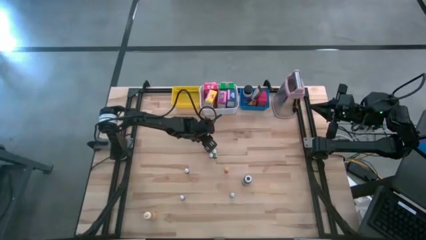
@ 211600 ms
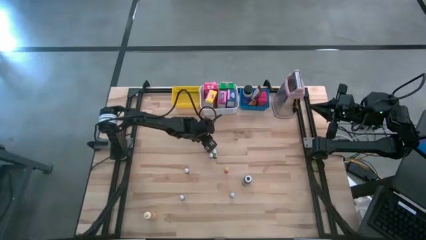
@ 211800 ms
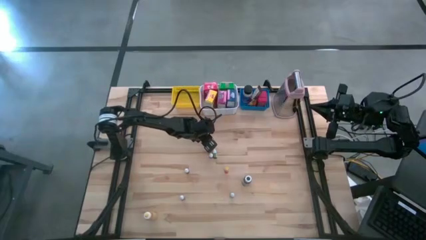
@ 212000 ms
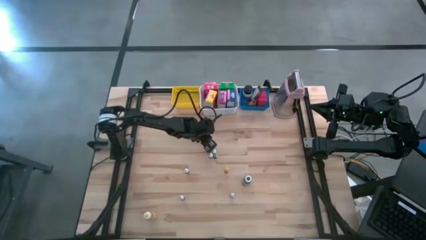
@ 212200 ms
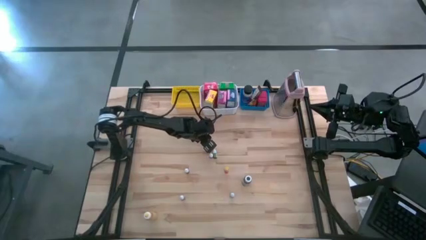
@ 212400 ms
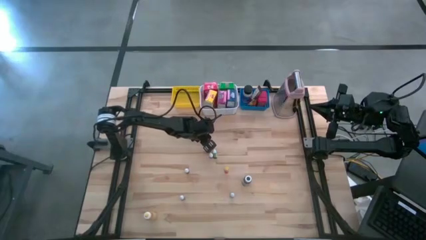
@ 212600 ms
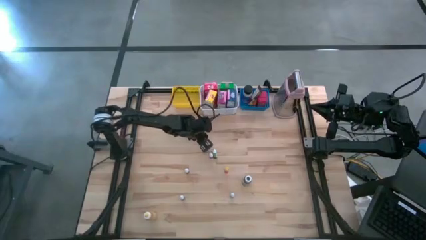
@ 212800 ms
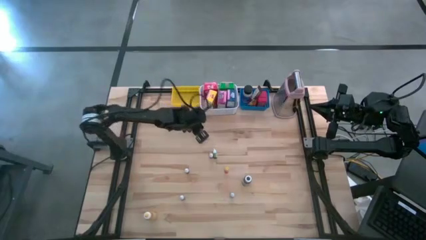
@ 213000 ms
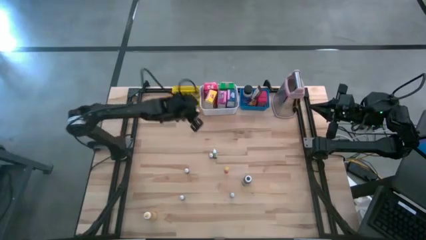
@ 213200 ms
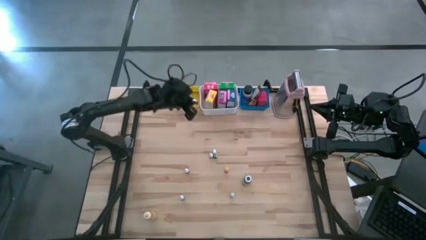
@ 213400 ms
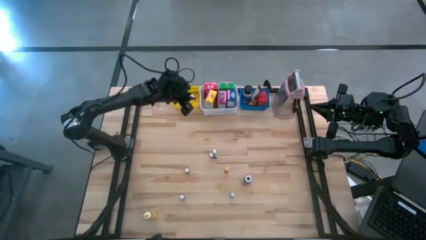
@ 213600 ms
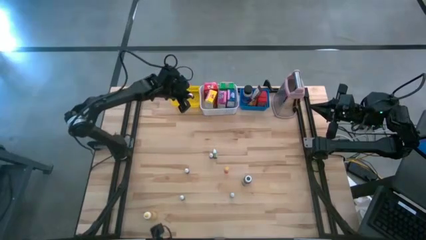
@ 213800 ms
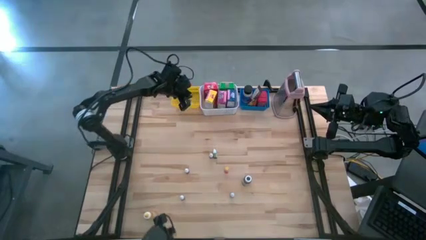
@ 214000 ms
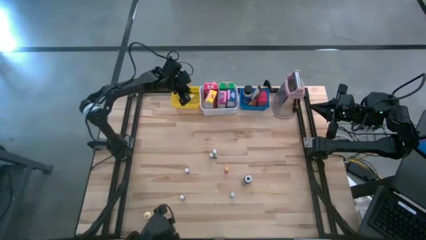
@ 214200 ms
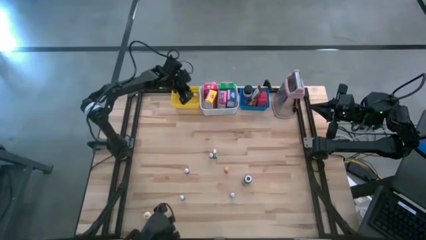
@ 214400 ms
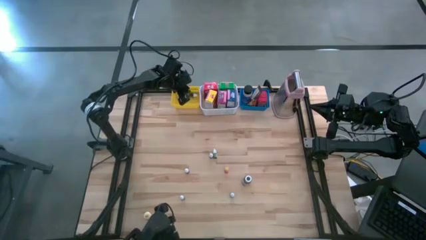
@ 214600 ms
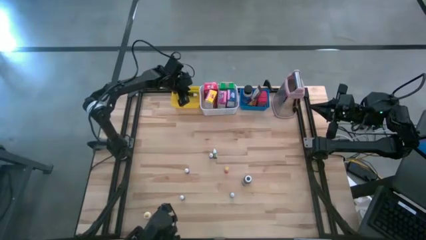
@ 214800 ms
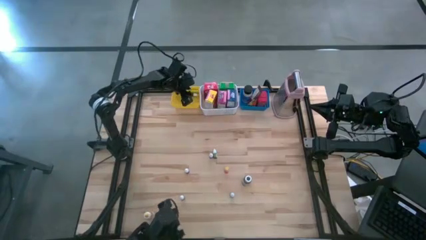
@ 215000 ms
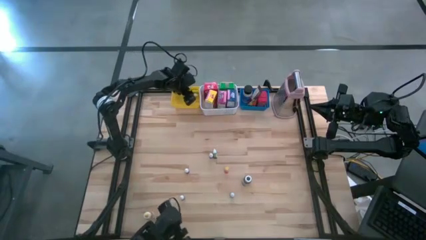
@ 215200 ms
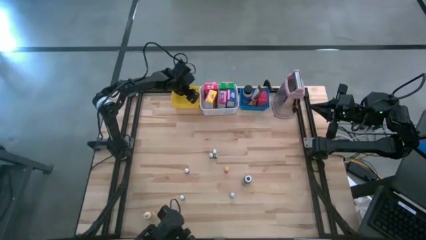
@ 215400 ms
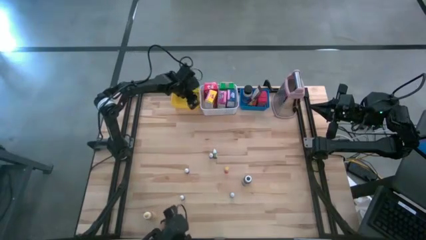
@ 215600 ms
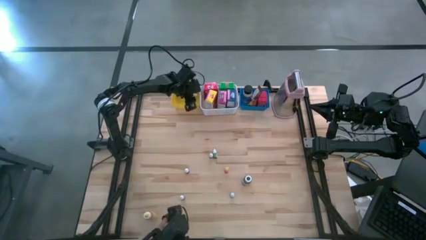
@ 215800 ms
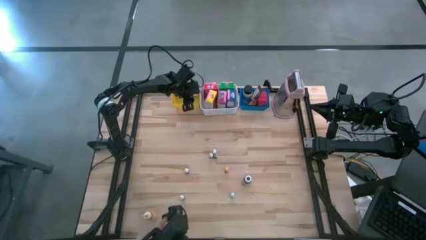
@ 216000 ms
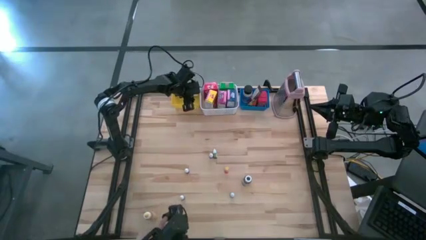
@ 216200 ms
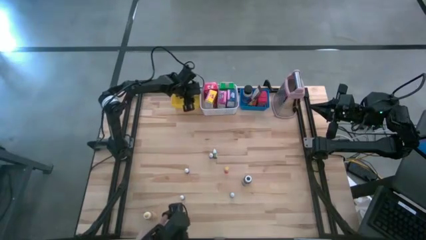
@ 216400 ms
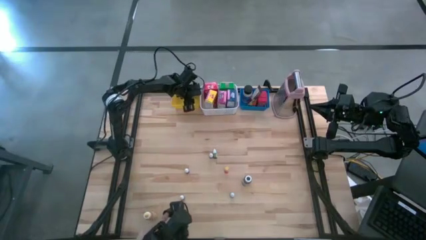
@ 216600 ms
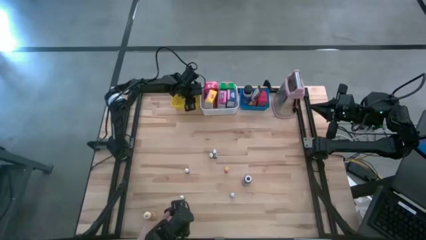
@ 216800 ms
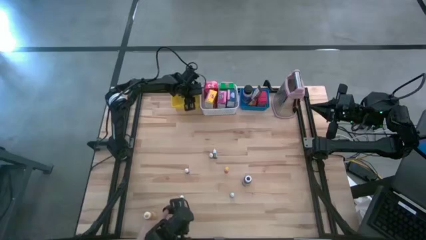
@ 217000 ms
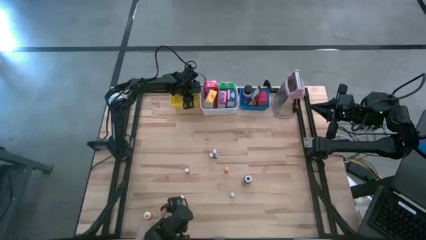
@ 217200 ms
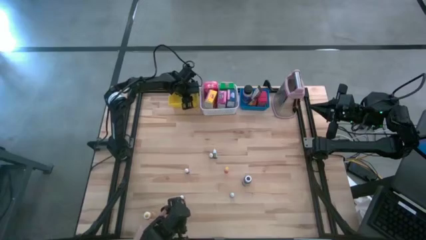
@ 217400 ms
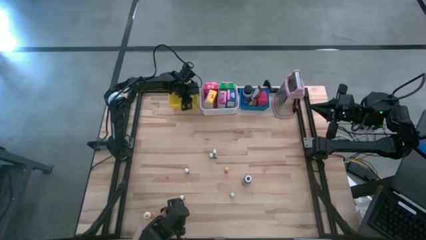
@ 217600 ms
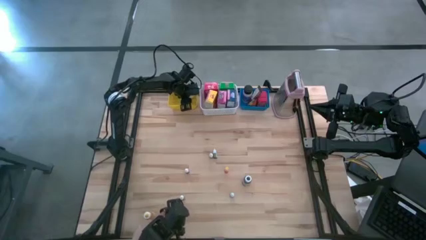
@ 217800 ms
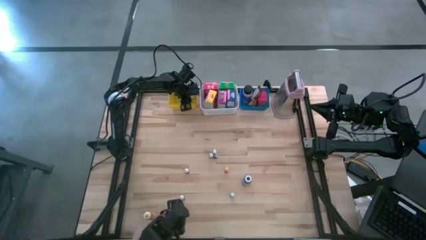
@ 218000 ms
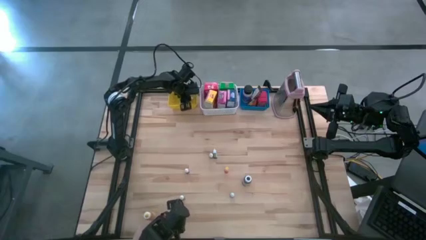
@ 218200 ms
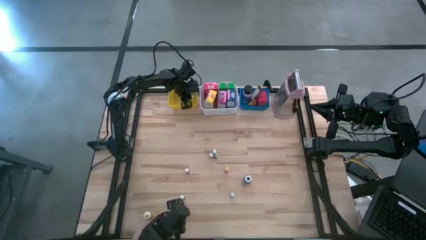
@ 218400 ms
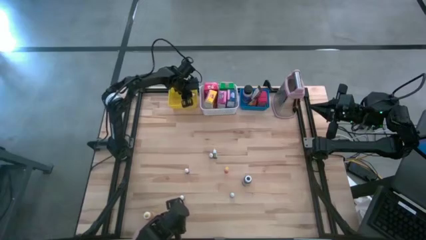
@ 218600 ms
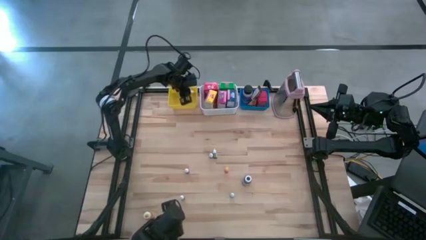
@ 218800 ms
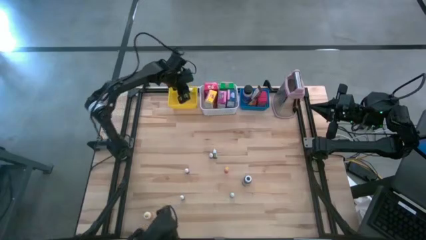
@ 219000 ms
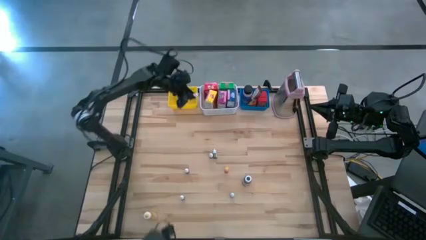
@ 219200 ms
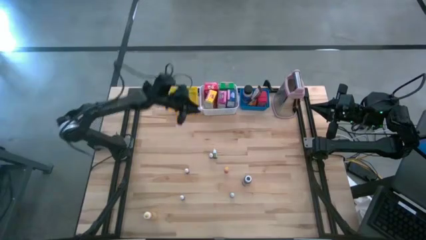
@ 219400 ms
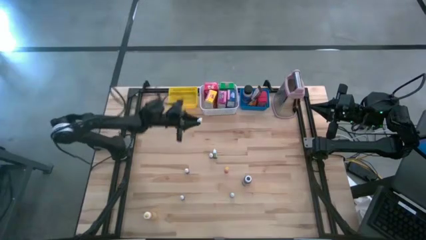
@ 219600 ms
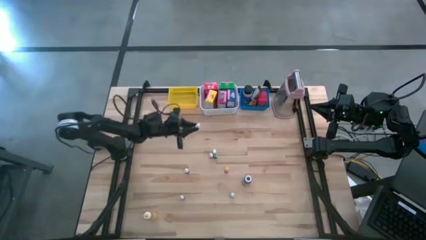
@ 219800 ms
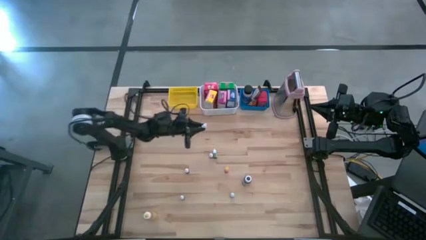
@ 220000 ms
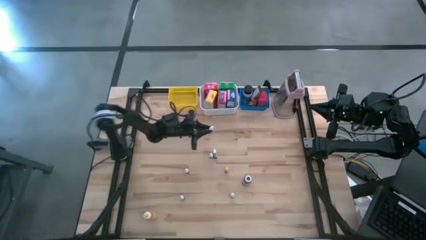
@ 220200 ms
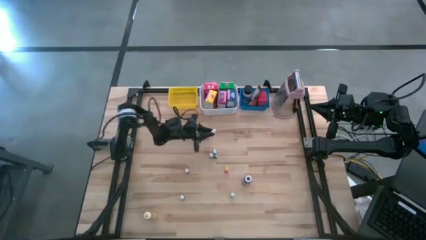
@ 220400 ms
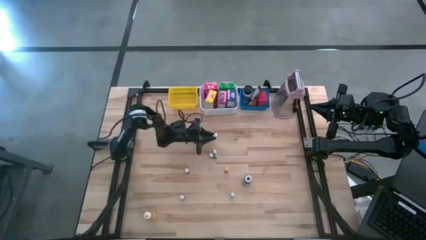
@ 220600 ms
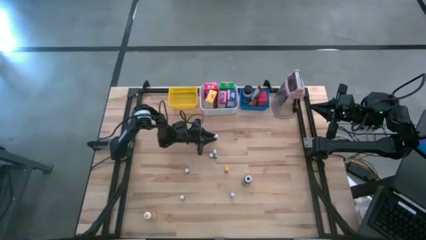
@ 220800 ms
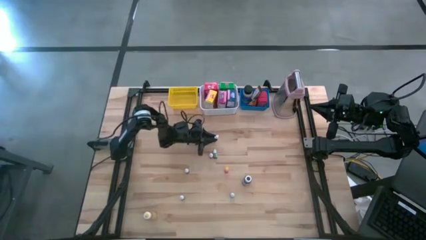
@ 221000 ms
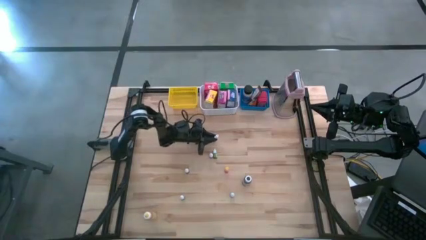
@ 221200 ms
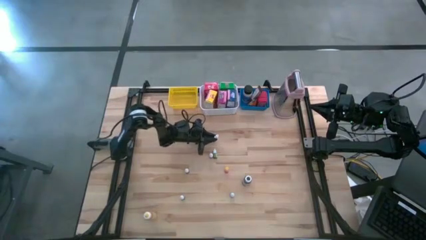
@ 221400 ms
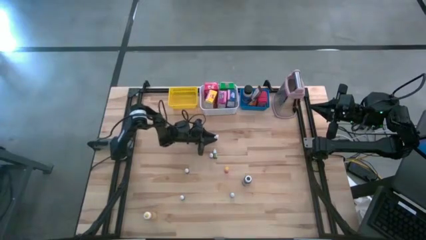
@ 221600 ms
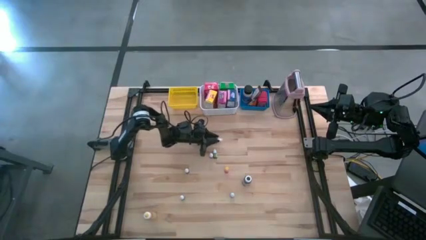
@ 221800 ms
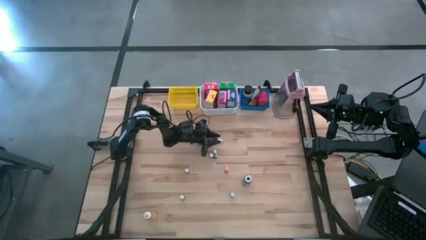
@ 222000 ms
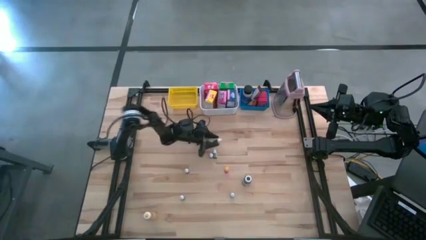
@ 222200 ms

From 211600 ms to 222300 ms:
Task: Pick & Place Kitchen Items
Put the black food coloring bottle into the yellow basket

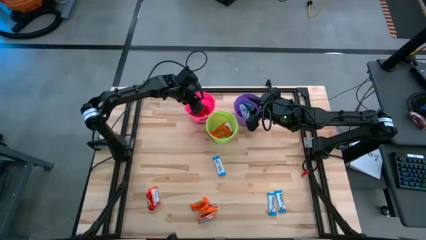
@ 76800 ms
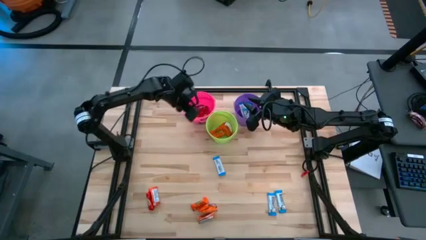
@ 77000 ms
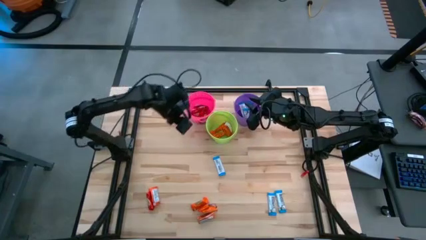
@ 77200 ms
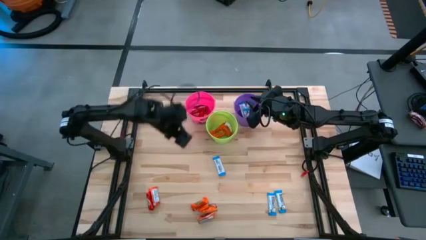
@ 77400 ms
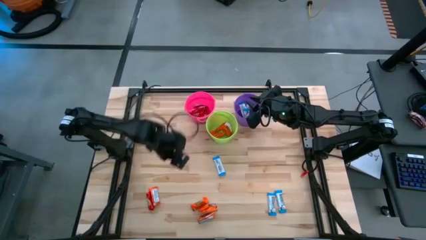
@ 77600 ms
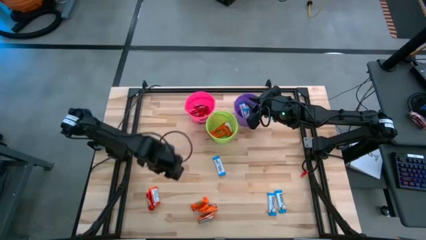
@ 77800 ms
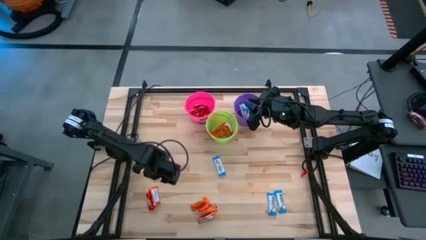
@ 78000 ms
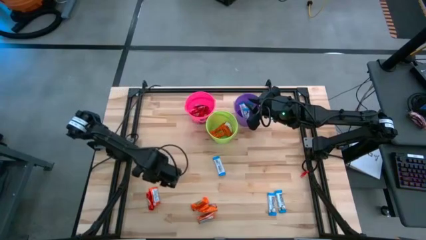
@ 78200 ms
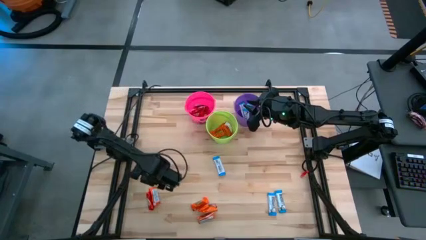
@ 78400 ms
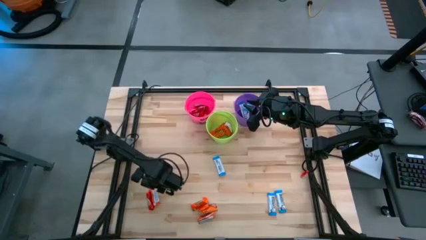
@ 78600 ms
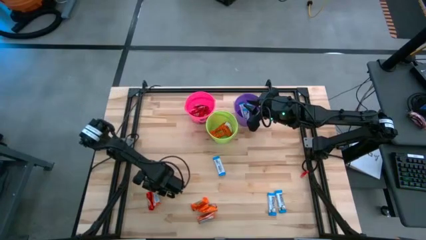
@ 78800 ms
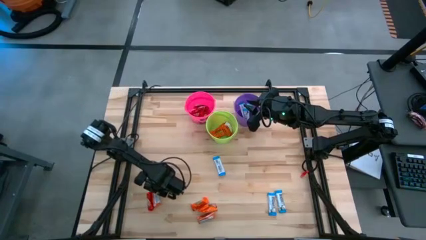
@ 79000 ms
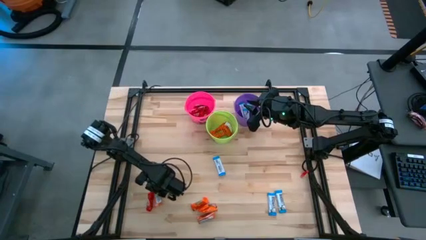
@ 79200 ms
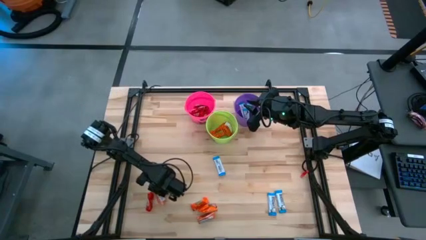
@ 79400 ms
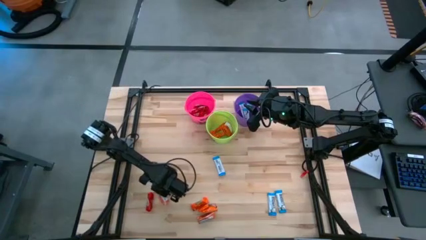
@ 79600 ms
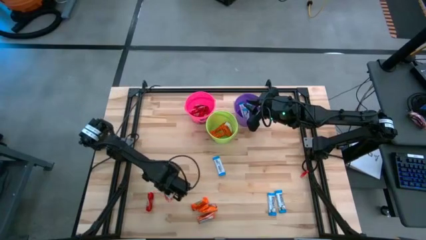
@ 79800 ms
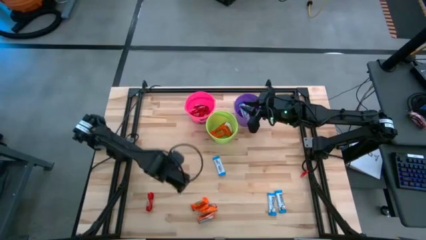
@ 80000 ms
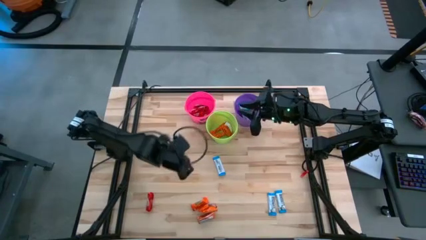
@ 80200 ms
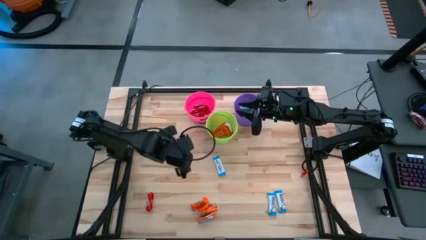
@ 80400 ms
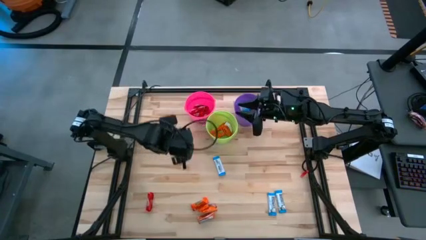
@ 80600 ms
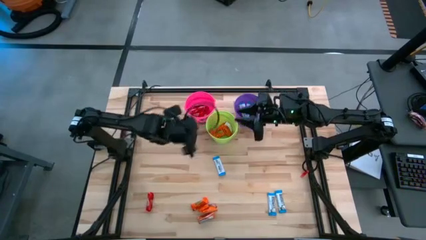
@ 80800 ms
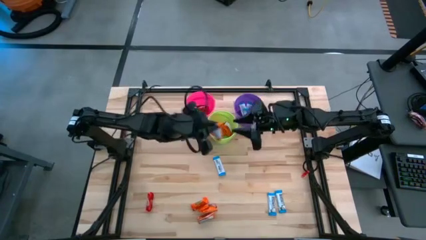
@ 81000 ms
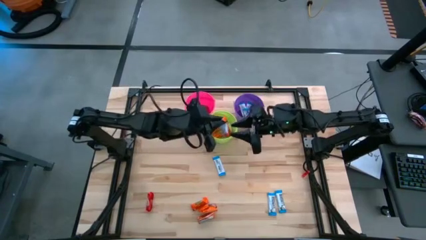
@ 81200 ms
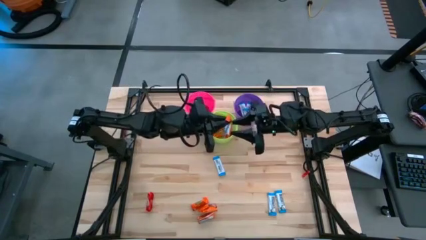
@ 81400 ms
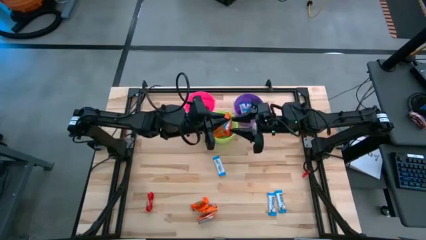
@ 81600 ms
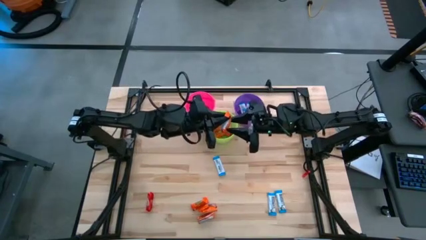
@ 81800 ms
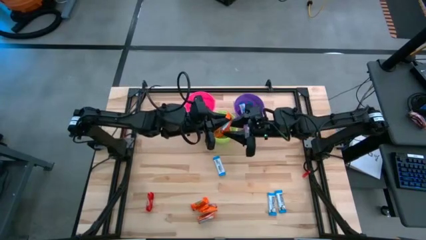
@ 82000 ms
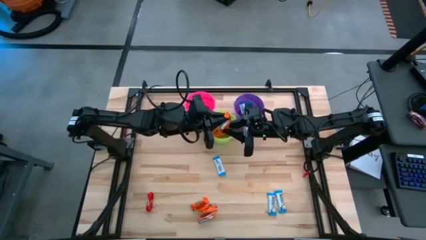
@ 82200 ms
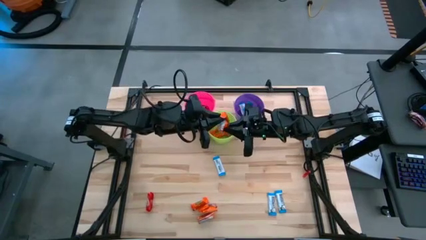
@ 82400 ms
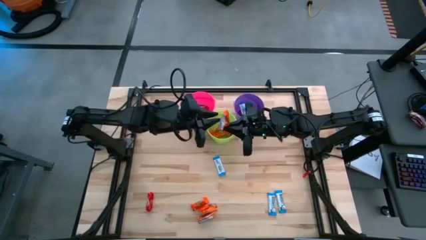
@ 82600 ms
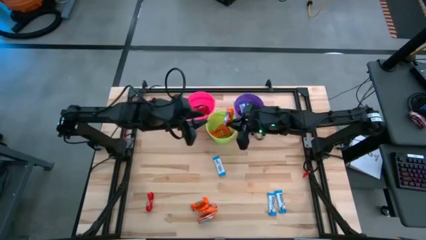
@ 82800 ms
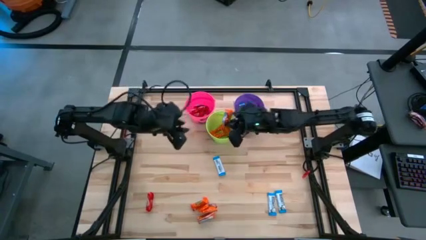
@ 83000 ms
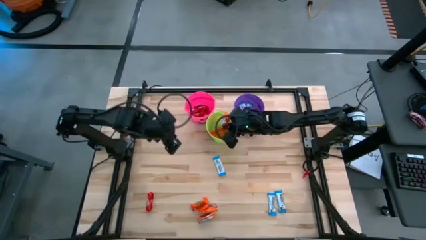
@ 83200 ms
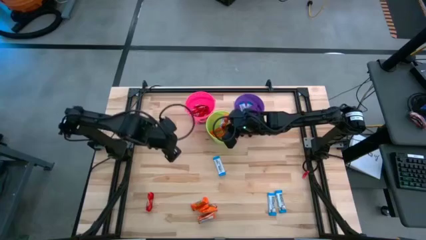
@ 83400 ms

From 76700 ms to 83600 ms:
Task: Sort candy
Put the orange candy into the green bin
